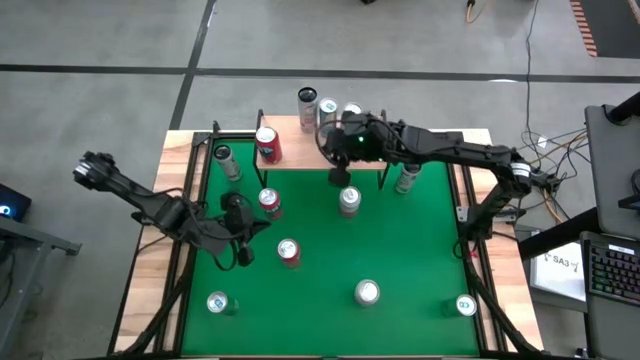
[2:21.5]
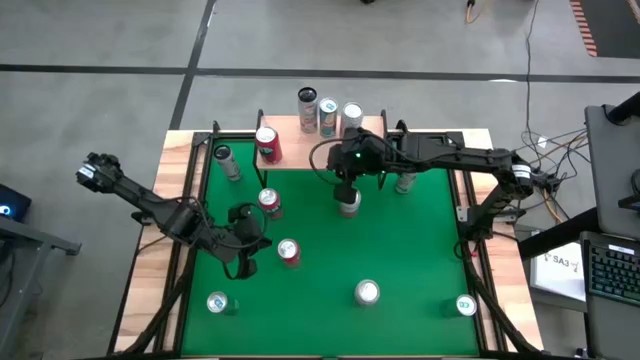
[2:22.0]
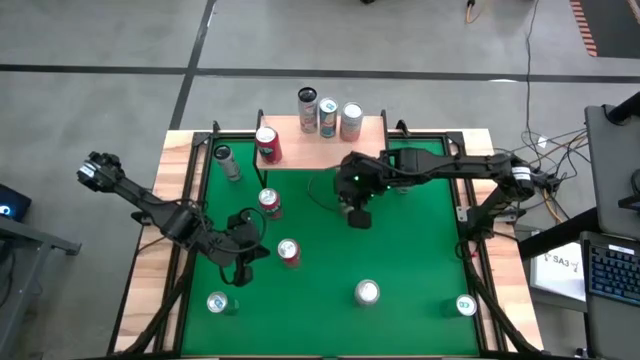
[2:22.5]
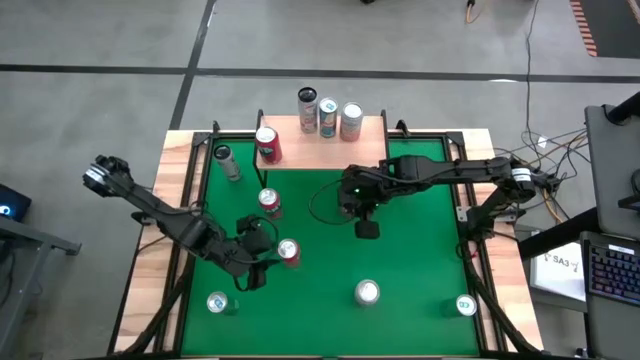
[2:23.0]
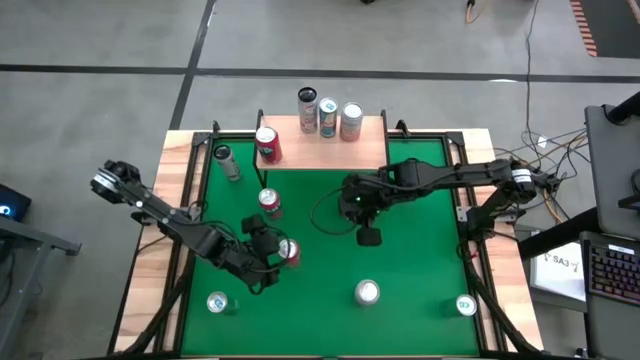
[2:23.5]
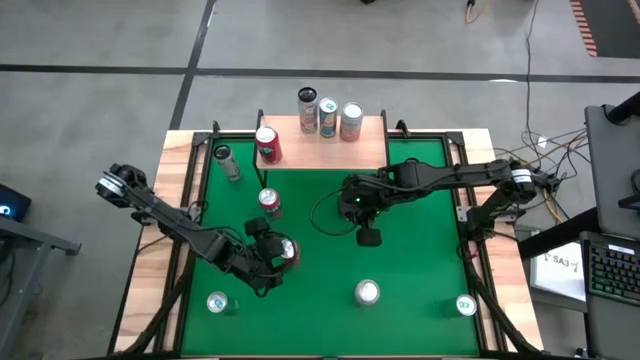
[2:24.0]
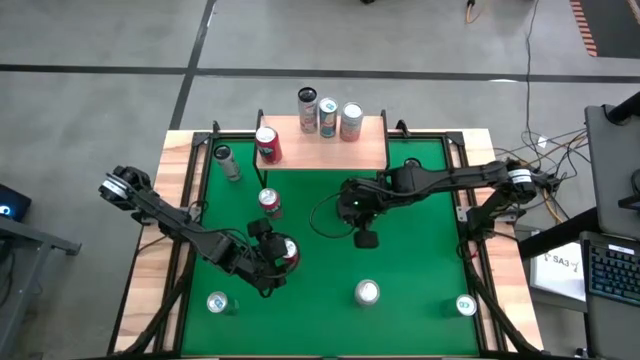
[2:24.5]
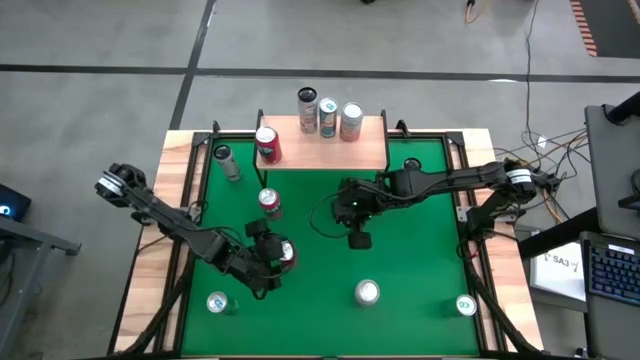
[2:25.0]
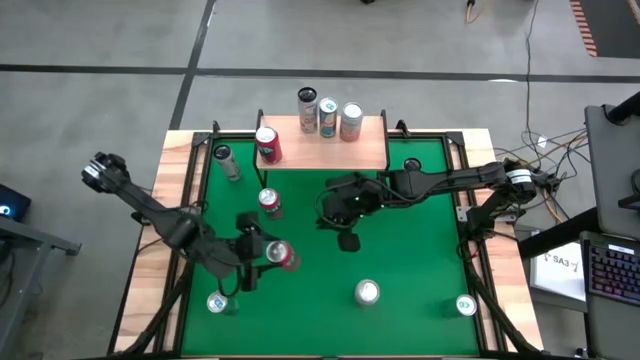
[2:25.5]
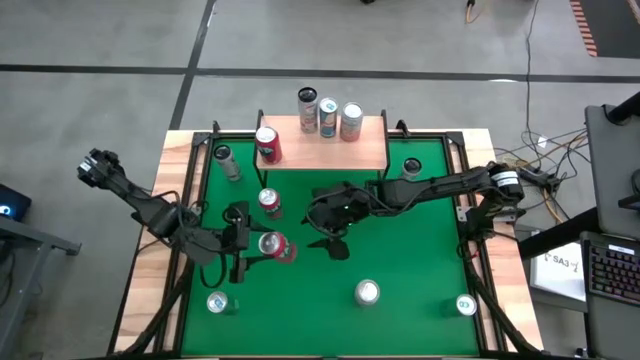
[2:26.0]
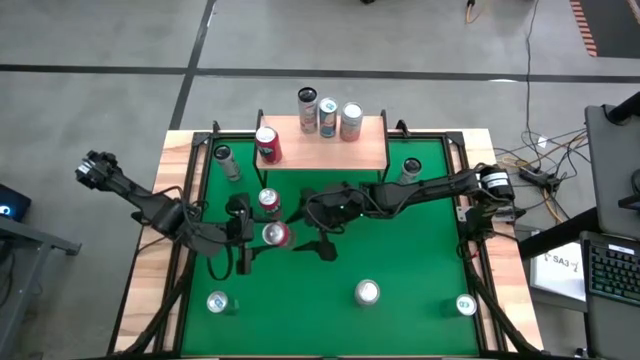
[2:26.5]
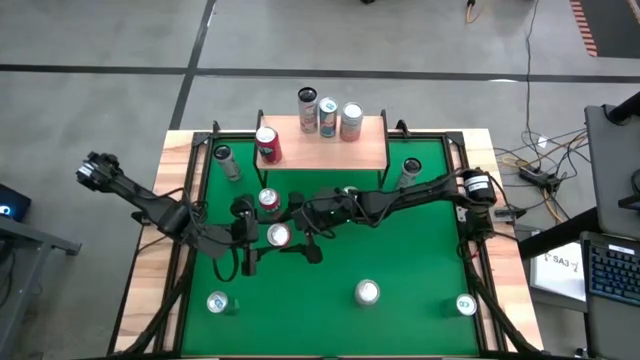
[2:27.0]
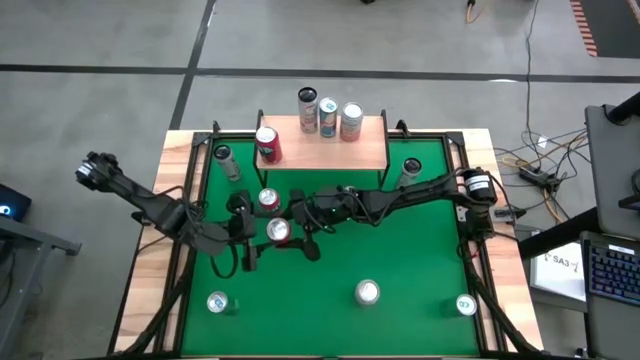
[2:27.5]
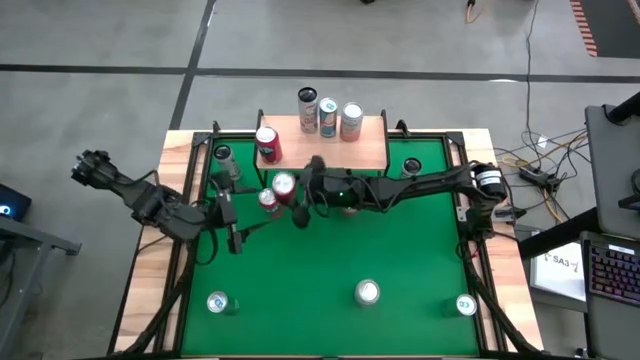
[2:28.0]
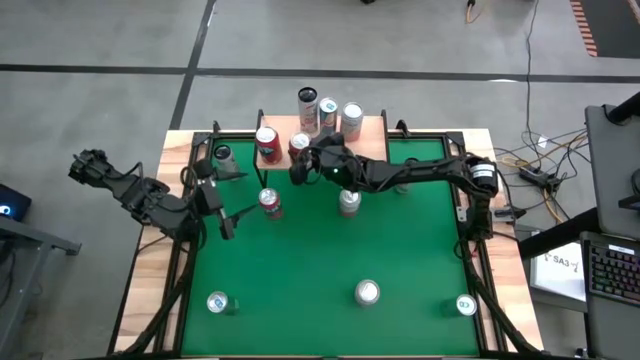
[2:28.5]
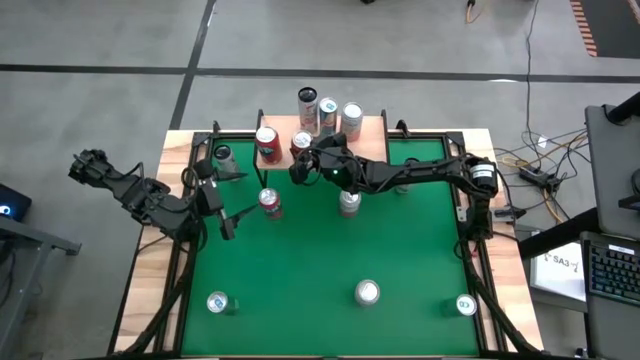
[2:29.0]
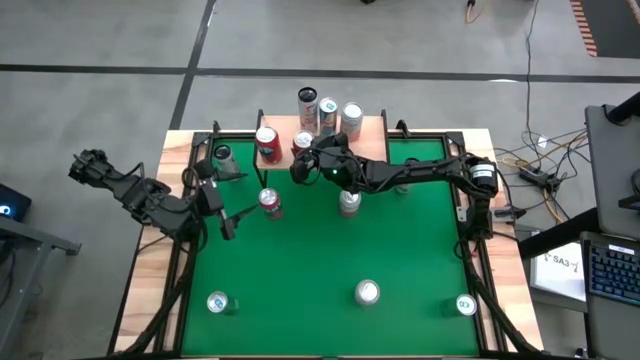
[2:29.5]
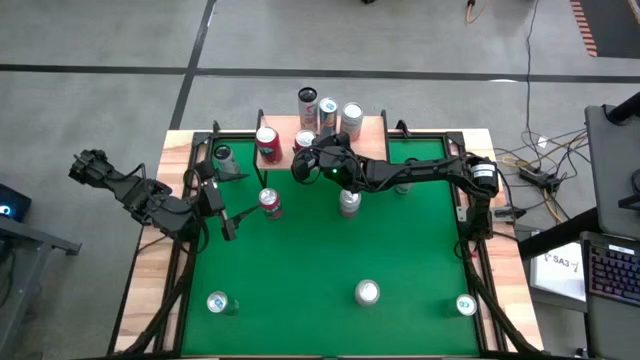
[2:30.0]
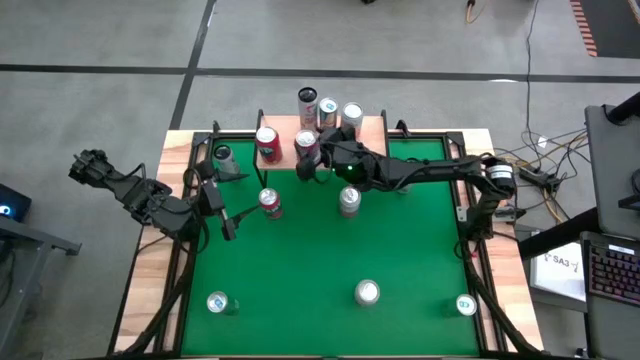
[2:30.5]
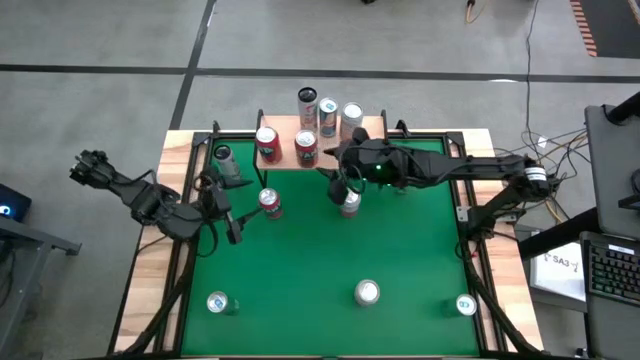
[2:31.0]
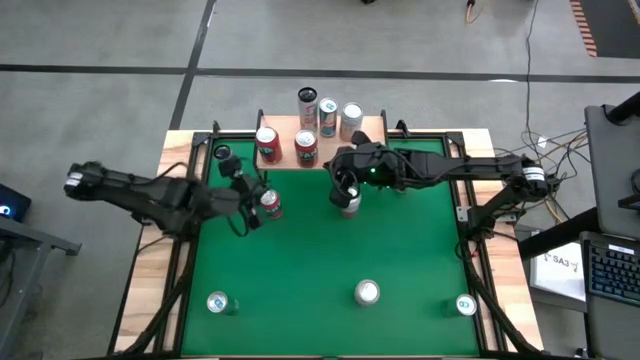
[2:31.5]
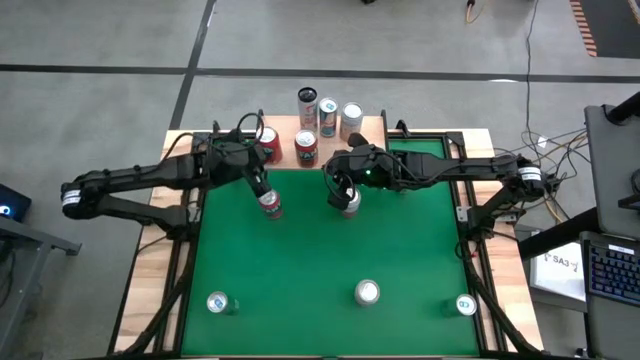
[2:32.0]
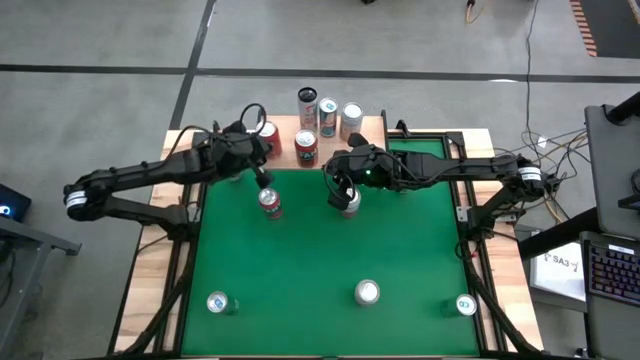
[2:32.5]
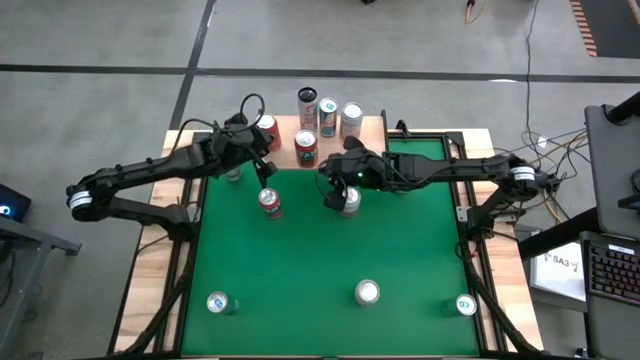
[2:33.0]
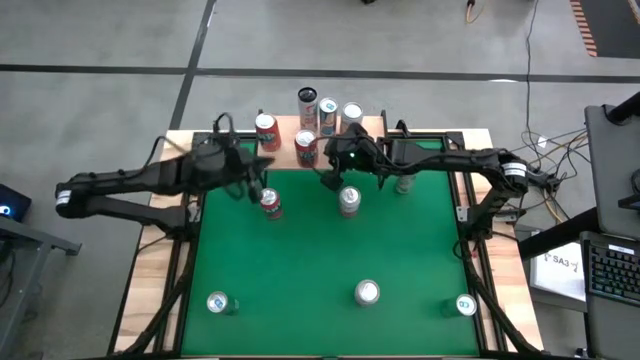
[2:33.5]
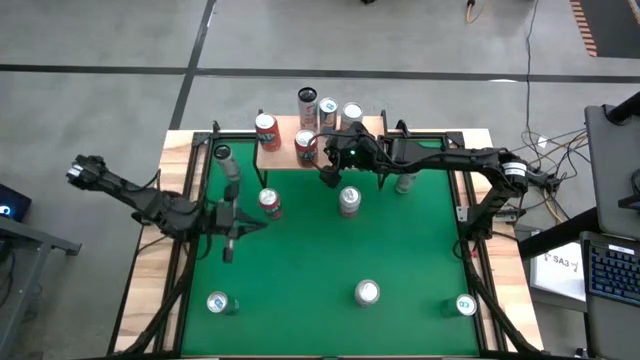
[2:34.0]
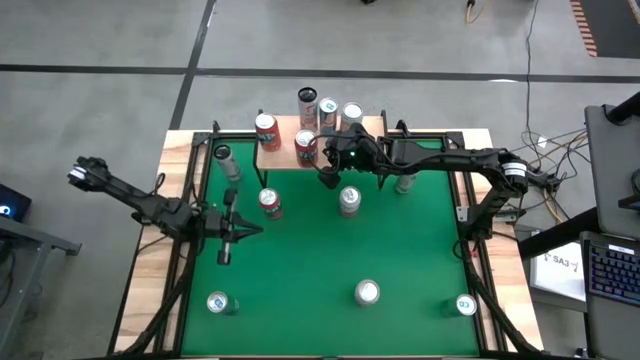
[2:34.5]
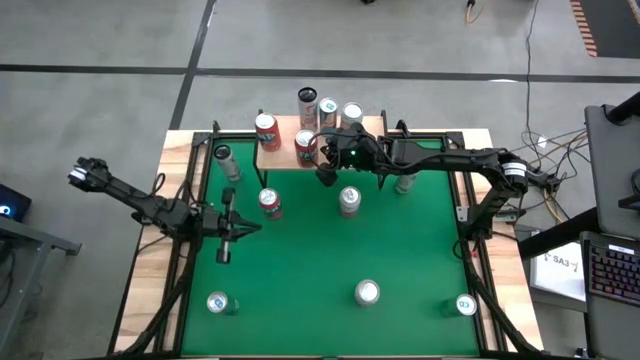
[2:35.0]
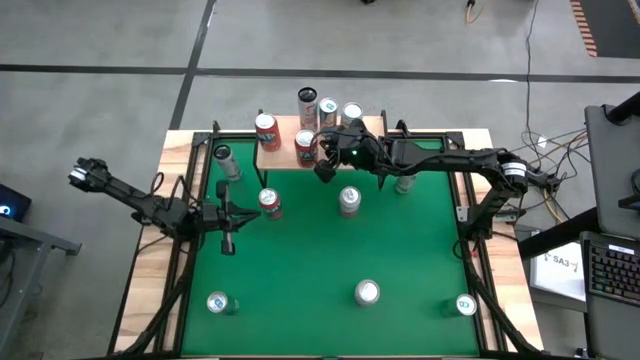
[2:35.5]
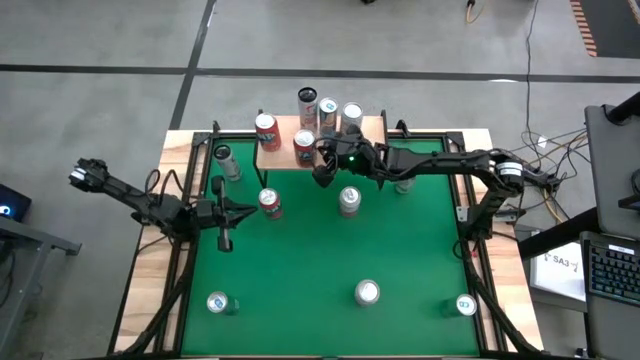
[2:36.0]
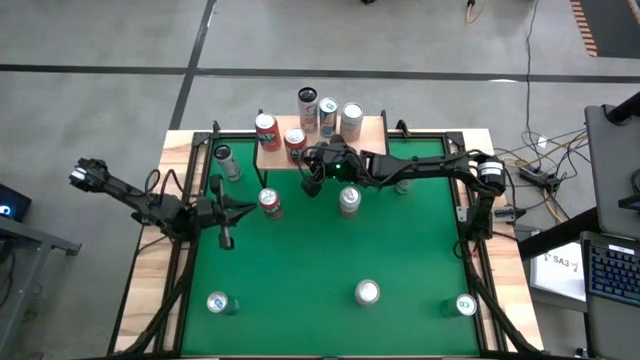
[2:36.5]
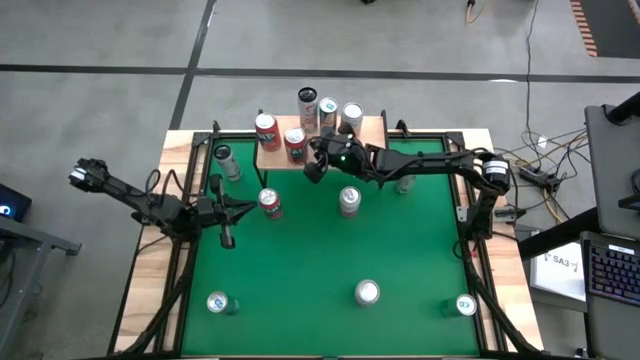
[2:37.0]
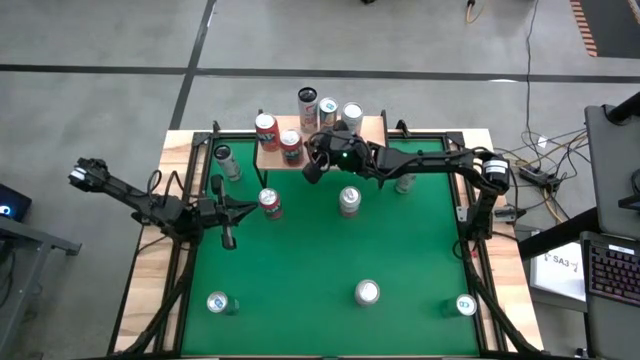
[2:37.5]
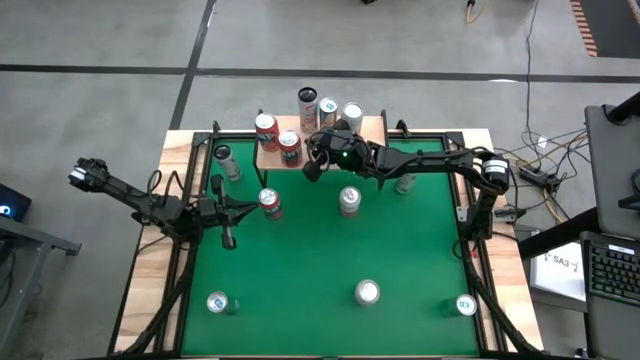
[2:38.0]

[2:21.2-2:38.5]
Task: Place canned beverage on shelf
Put the bottom orange soda can on the shelf aligned with other orange soda cans

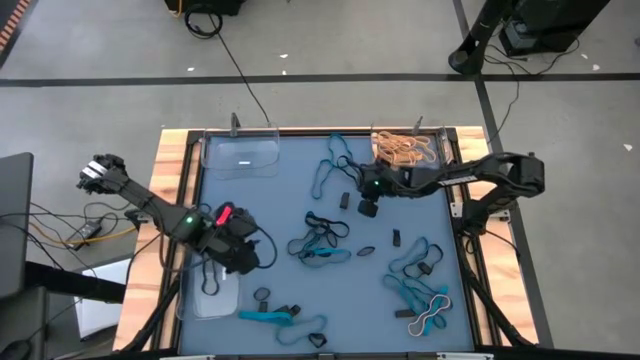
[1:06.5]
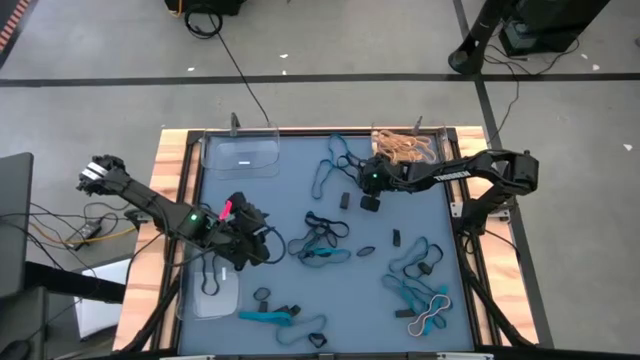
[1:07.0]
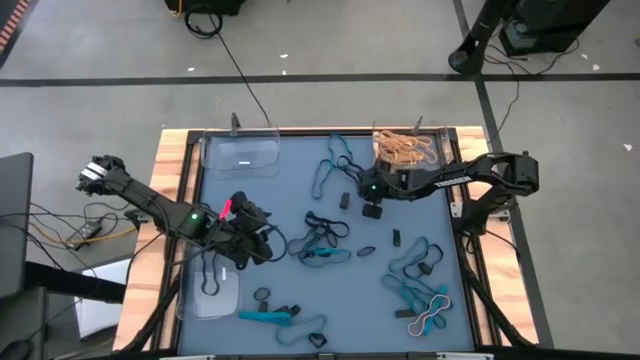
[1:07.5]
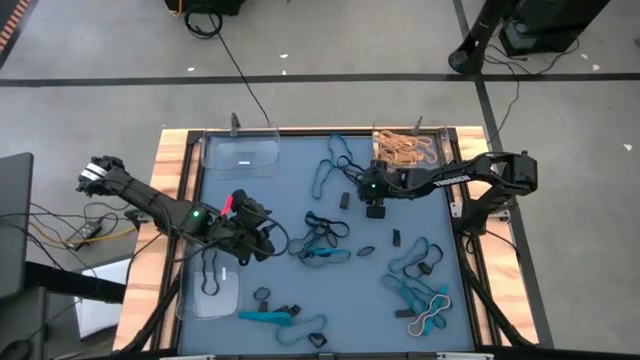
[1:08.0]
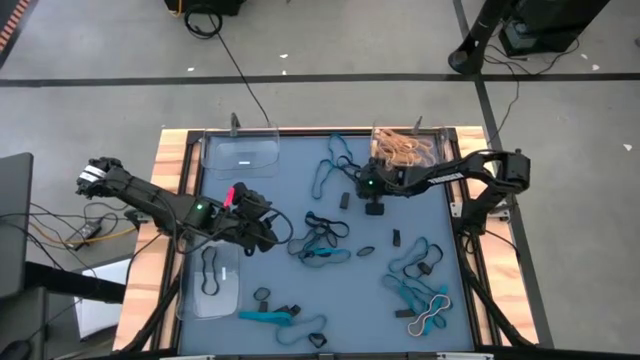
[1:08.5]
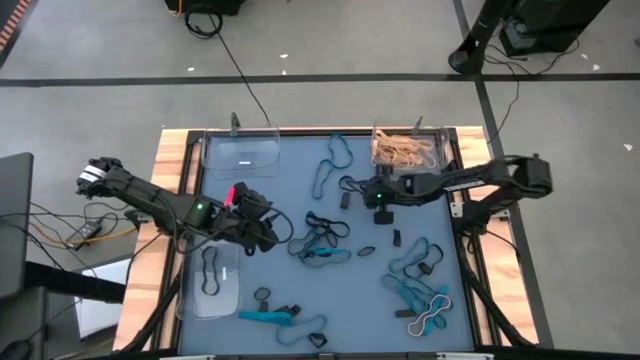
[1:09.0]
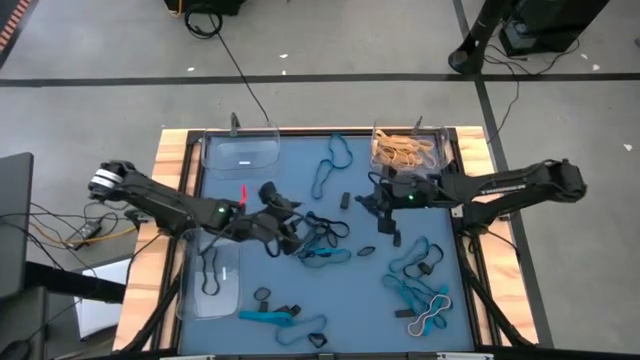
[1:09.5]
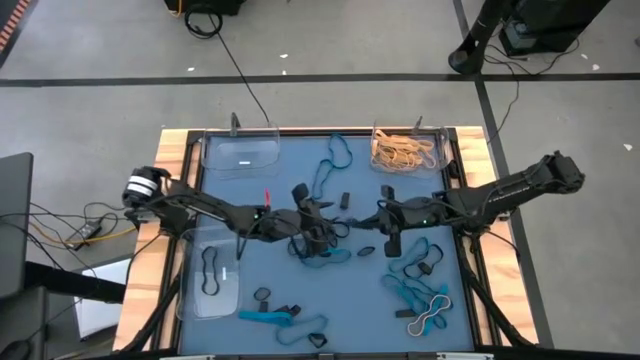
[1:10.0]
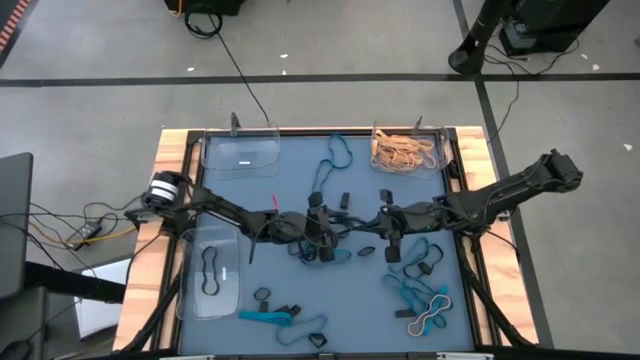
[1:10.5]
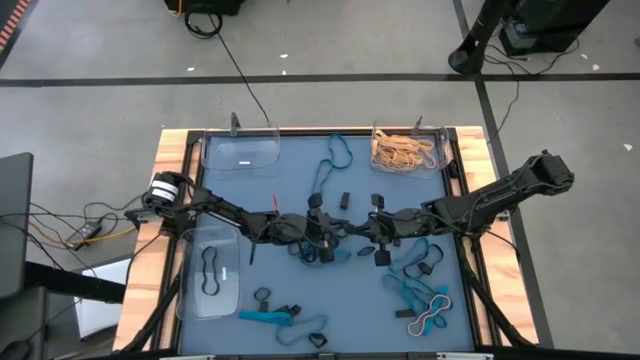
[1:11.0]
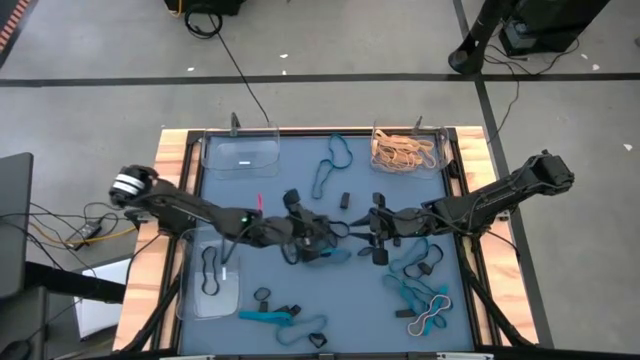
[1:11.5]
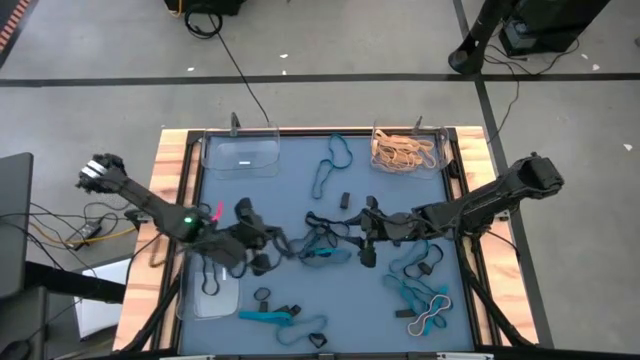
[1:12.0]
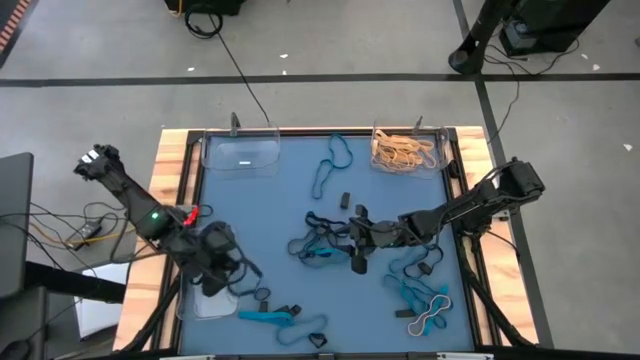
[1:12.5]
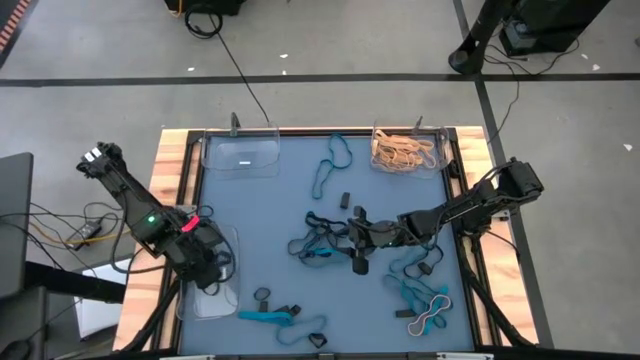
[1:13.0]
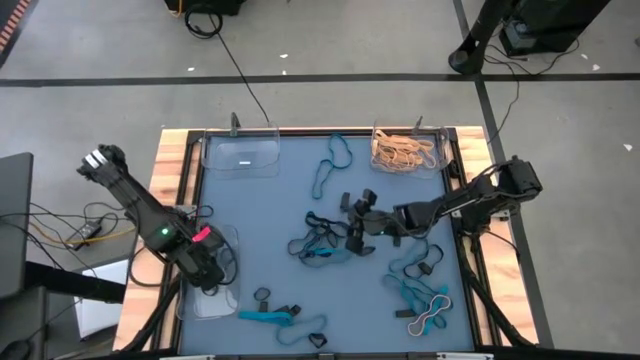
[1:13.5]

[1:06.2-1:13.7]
Task: Sort rubber bands into baskets
Put the big black rubber band into the bottom left transparent bin
